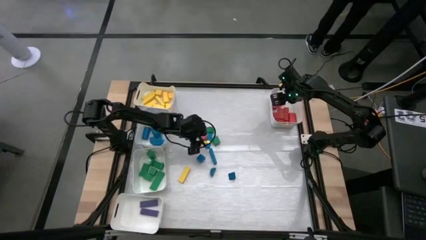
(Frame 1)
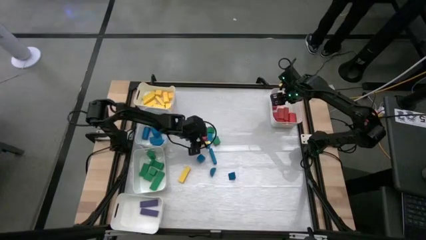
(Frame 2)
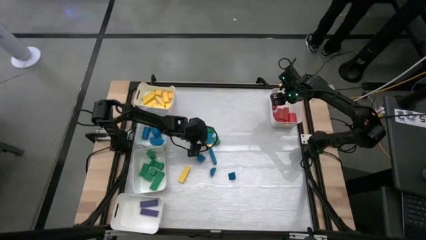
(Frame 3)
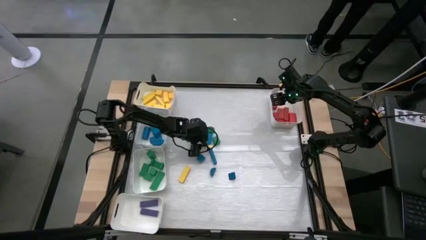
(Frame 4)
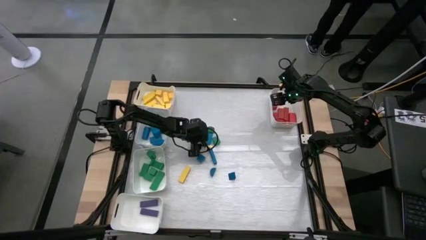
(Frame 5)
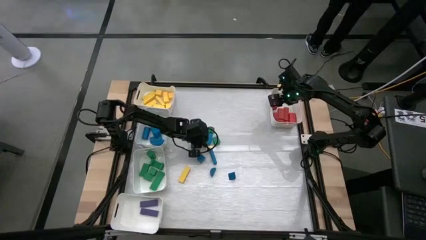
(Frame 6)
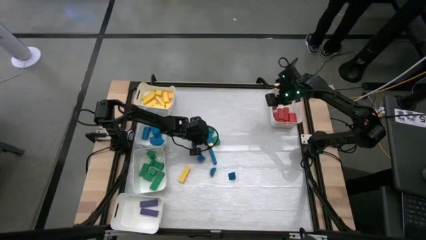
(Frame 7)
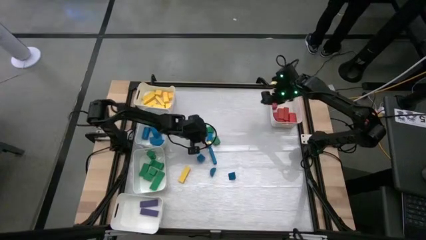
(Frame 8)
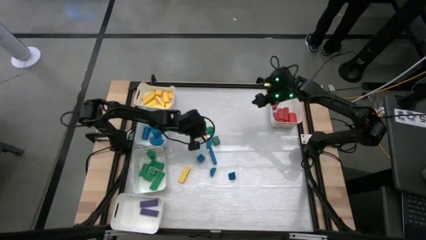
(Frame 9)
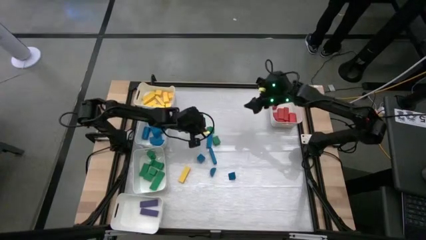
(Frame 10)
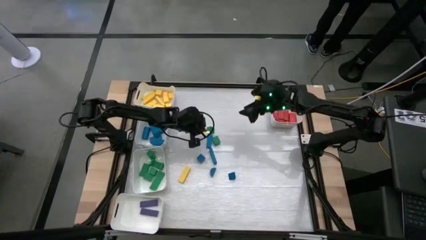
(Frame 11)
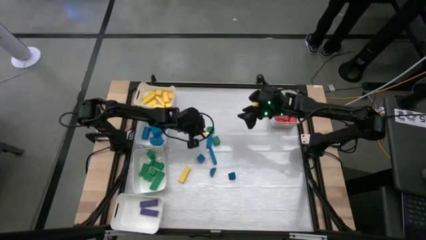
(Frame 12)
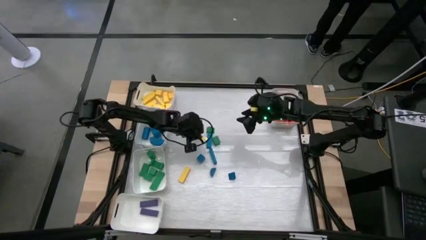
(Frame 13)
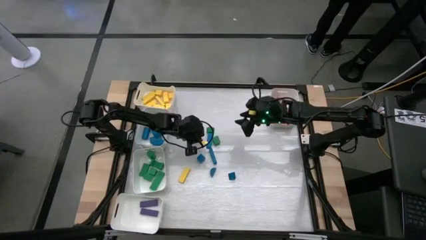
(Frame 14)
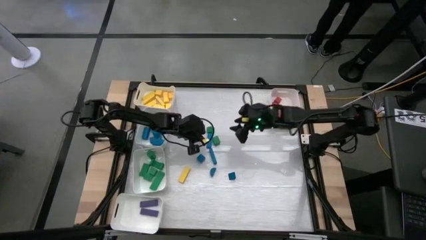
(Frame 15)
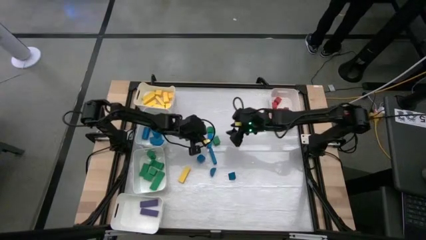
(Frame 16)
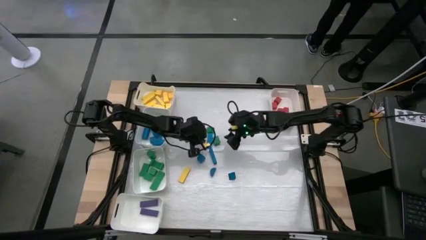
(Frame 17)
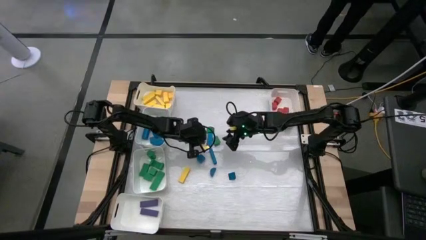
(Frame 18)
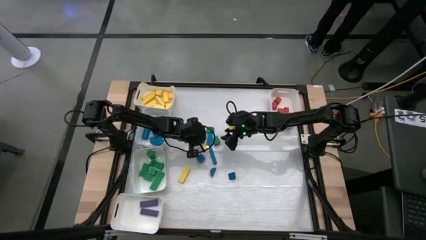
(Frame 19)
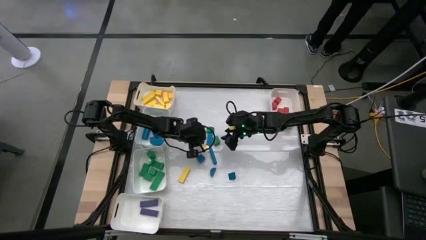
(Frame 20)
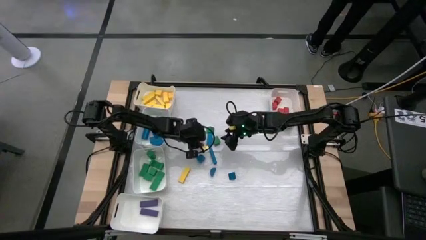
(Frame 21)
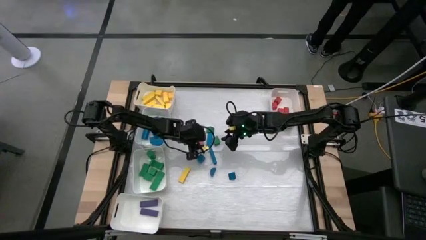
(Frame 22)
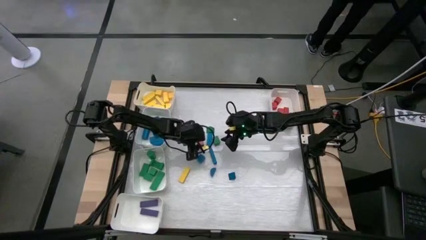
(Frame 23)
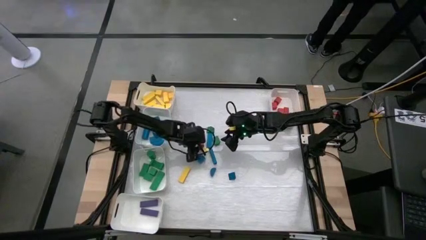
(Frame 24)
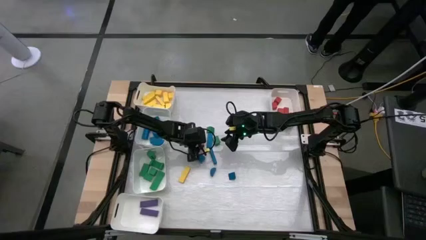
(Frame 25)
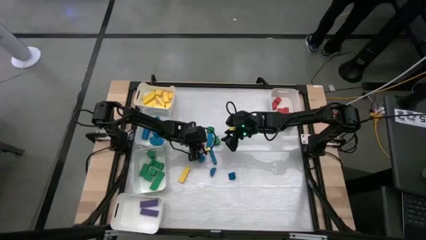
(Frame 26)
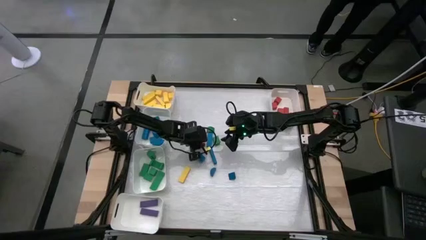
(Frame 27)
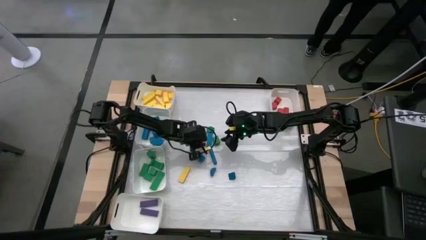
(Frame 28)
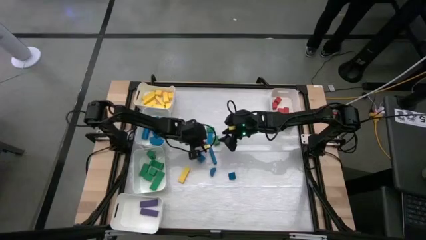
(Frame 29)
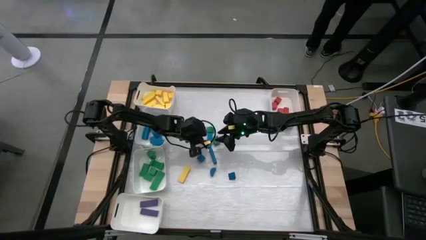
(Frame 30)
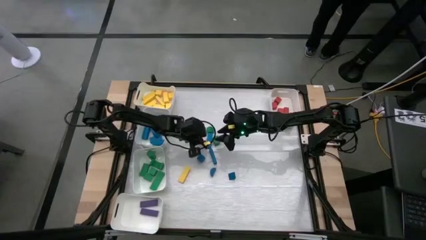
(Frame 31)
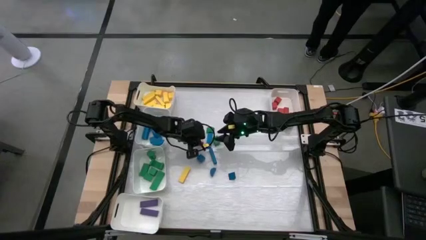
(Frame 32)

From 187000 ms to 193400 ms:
Task: Sort blocks
Put the red wooden block into the top right white bin

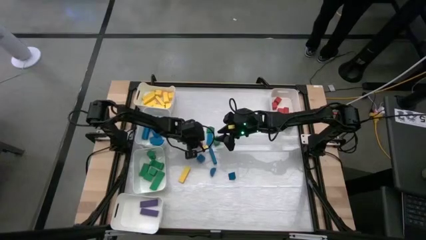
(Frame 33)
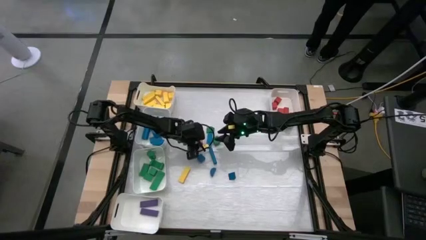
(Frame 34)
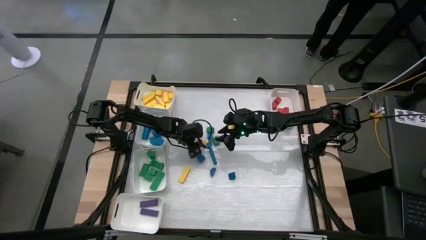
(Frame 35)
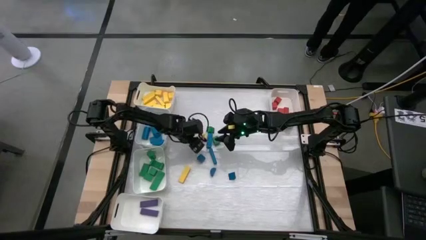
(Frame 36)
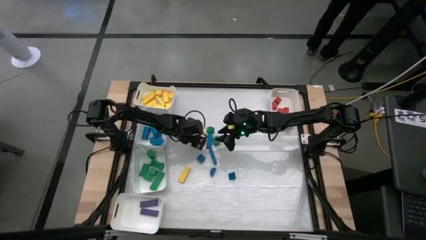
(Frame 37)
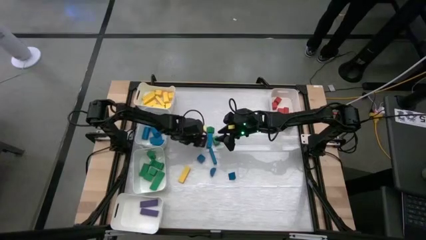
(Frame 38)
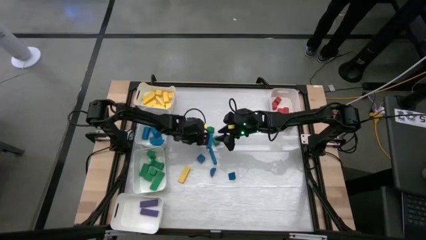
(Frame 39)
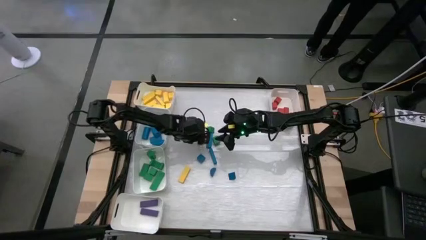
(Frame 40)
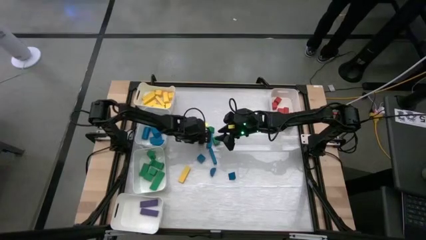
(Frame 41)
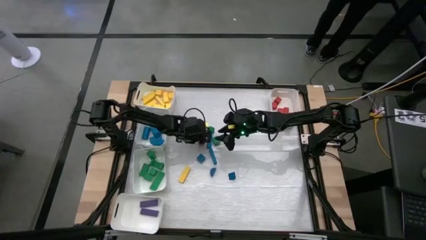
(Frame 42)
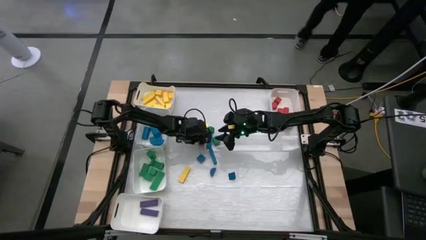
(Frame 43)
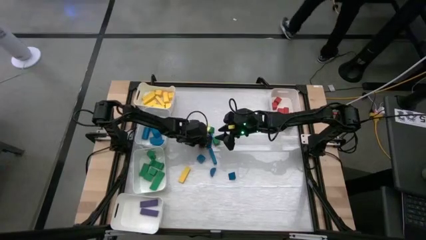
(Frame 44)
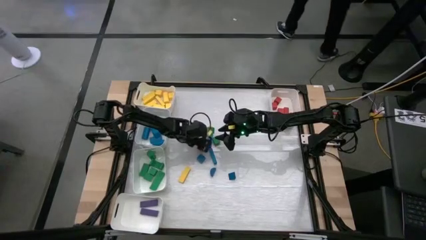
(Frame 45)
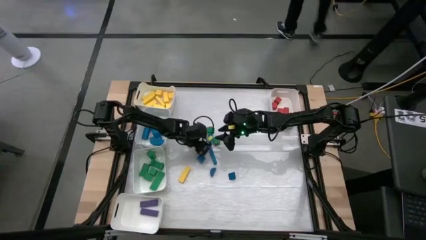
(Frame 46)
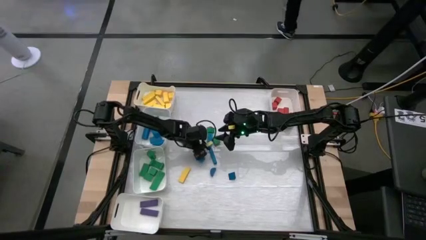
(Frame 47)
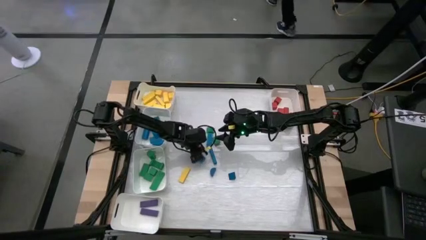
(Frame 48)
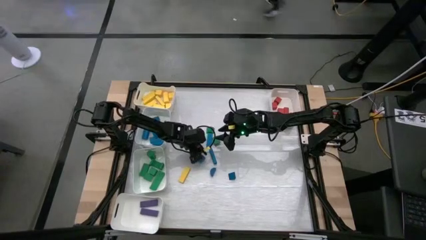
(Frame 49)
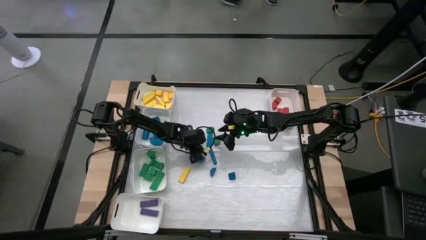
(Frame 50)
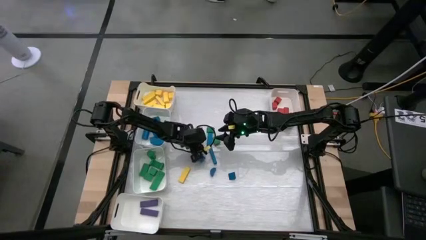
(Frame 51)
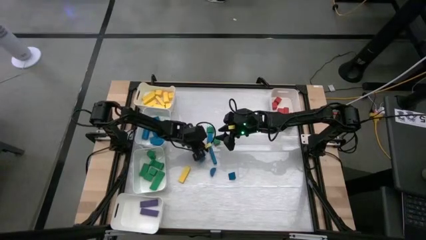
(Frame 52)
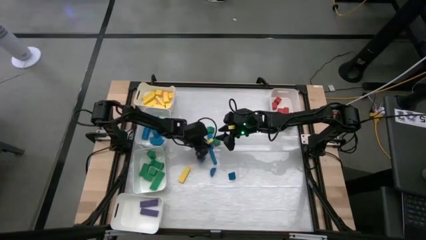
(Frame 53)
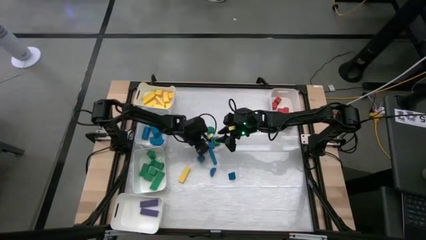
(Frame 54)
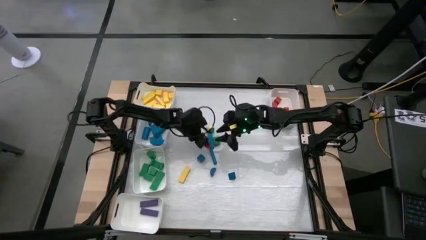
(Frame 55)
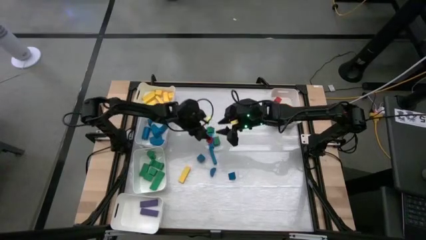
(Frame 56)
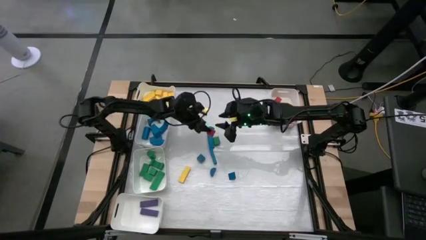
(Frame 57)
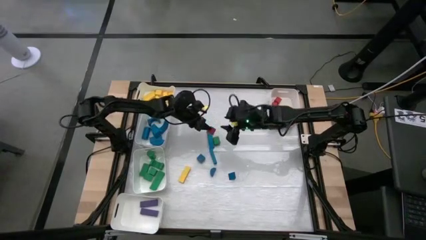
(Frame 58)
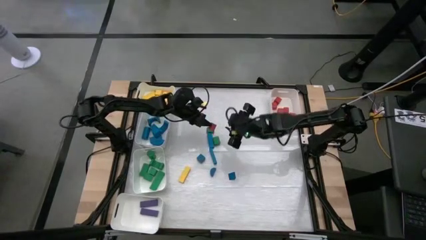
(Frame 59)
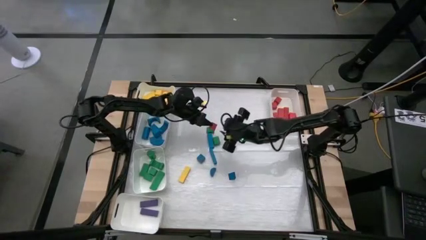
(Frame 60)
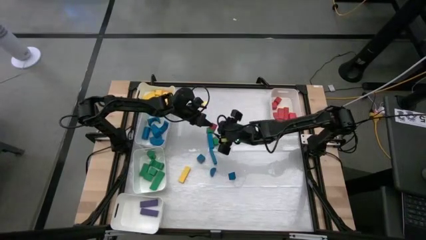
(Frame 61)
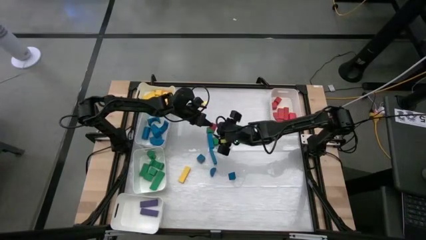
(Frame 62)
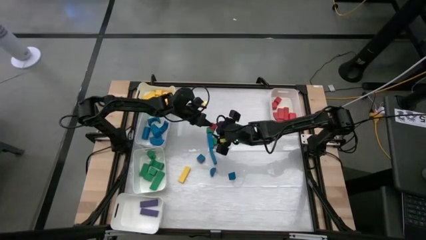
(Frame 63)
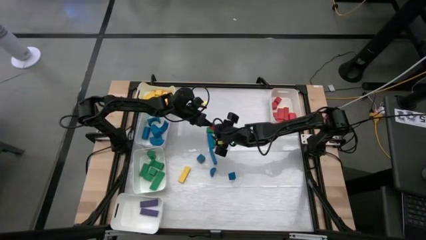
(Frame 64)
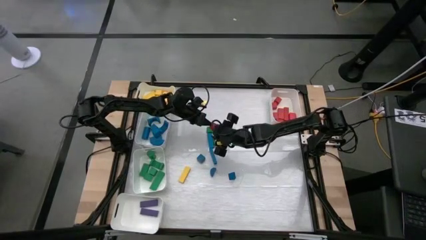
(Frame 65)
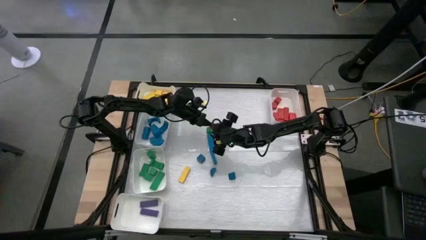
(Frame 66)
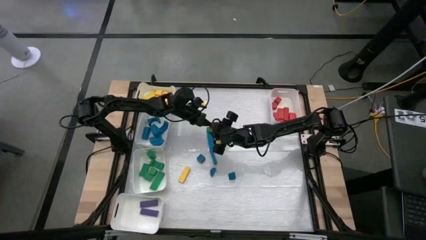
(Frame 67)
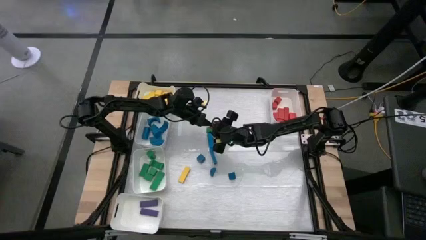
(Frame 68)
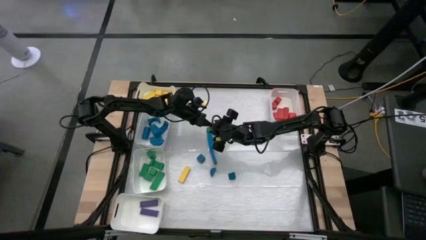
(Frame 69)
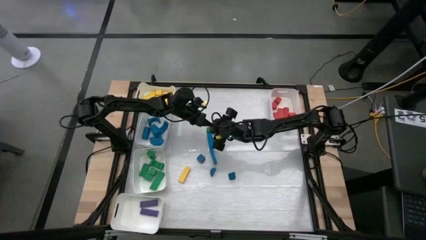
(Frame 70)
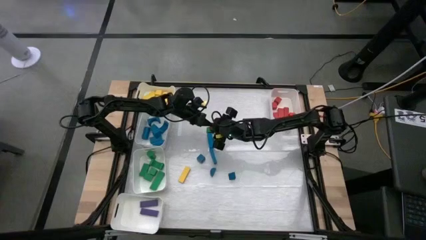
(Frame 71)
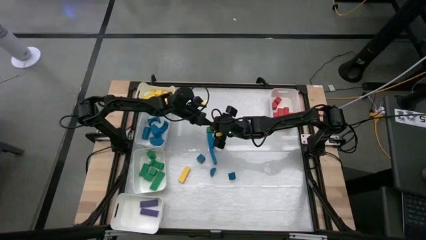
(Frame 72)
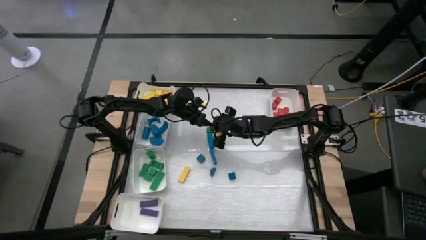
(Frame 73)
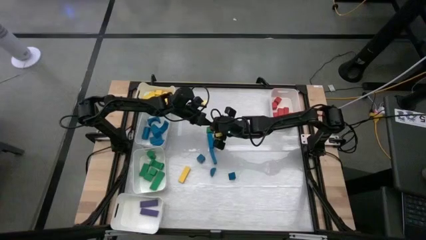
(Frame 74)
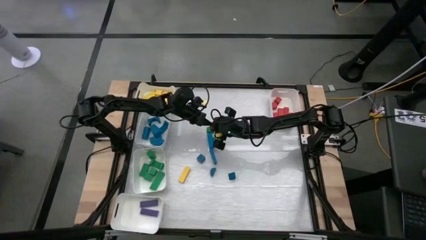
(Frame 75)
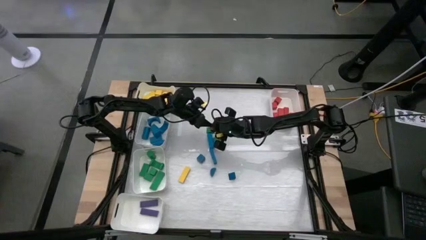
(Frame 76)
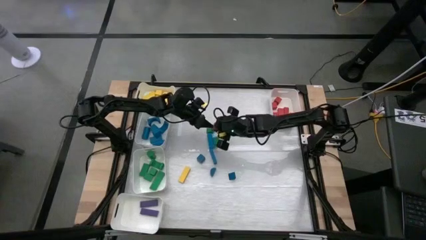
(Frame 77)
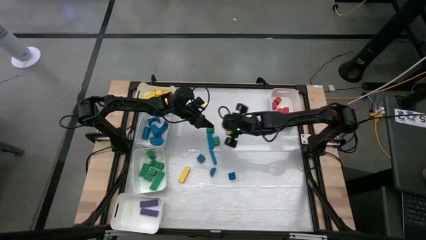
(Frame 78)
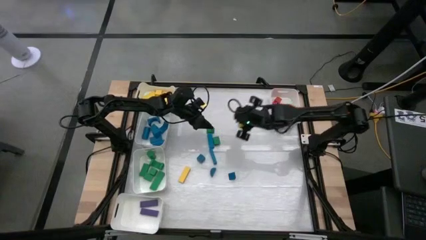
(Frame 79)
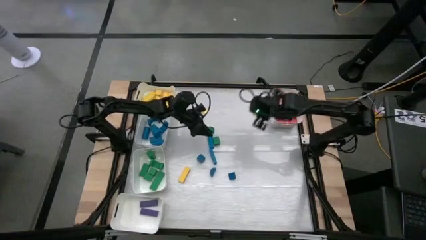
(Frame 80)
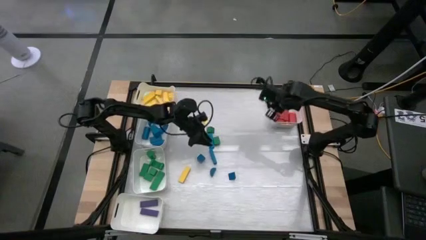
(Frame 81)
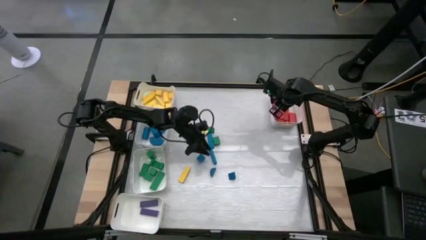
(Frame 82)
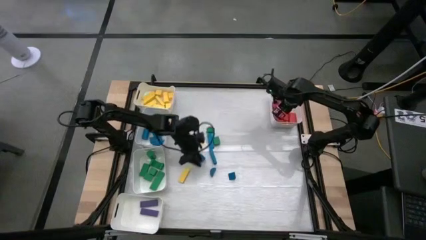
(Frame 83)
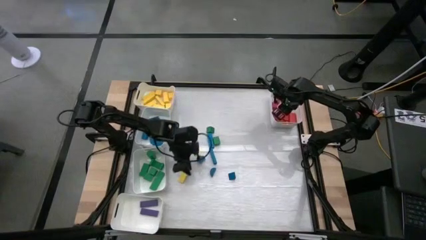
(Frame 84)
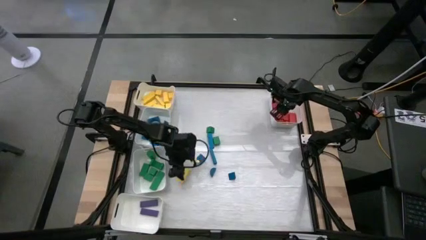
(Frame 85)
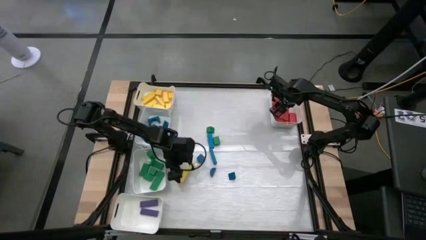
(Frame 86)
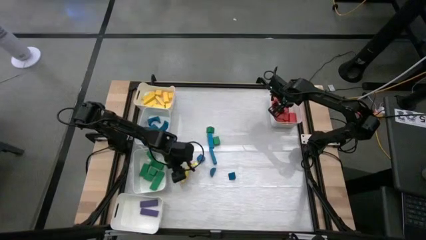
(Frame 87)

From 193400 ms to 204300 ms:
Put the red wooden block into the top right white bin
